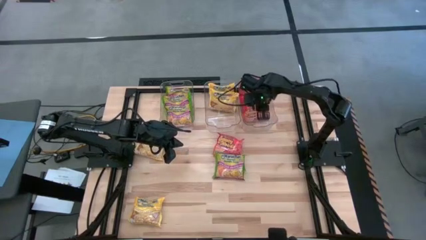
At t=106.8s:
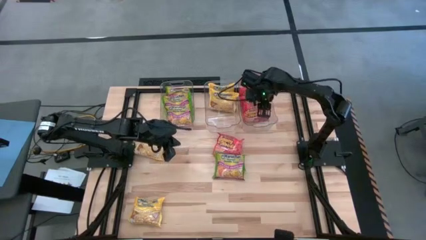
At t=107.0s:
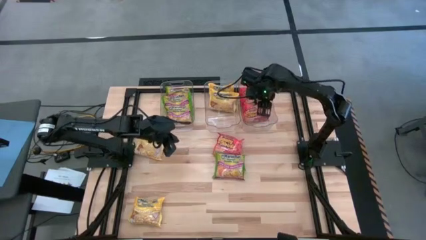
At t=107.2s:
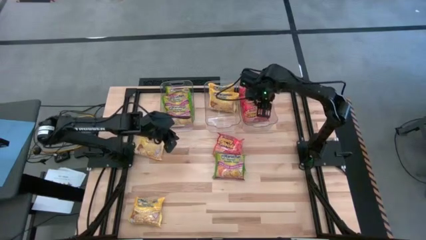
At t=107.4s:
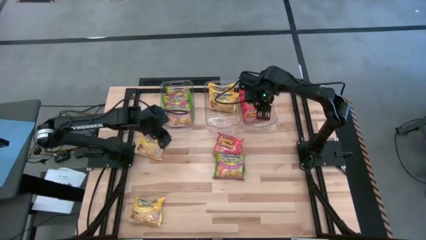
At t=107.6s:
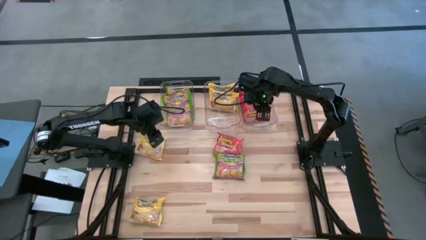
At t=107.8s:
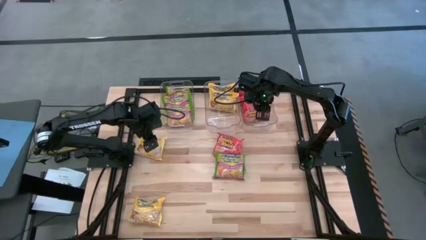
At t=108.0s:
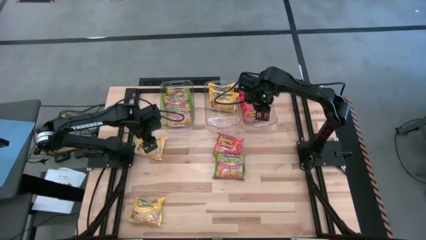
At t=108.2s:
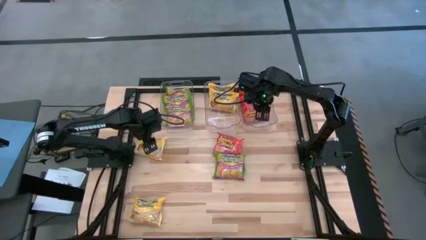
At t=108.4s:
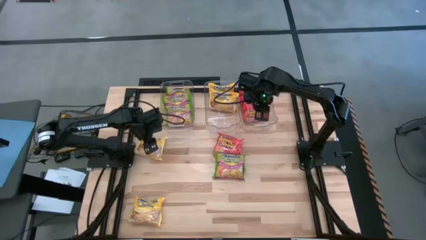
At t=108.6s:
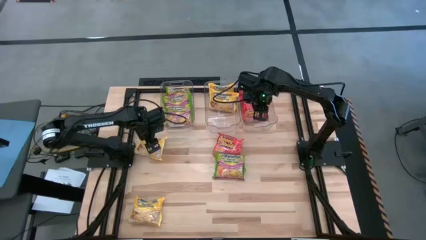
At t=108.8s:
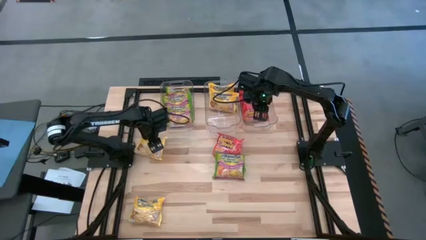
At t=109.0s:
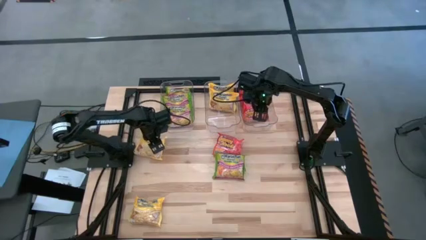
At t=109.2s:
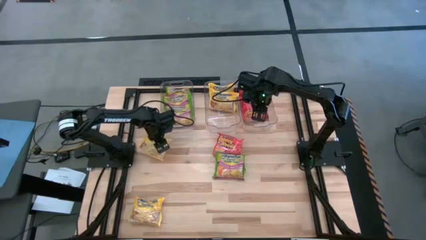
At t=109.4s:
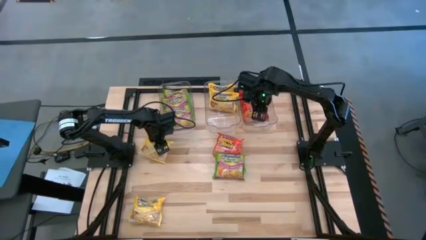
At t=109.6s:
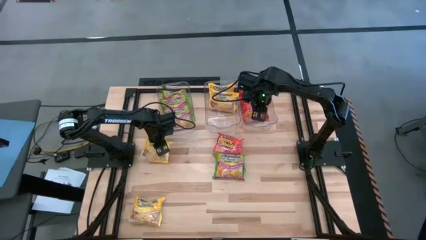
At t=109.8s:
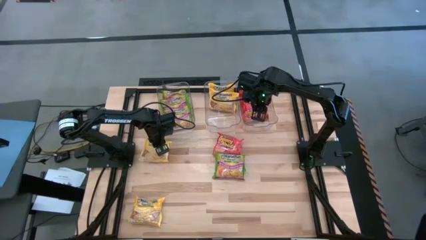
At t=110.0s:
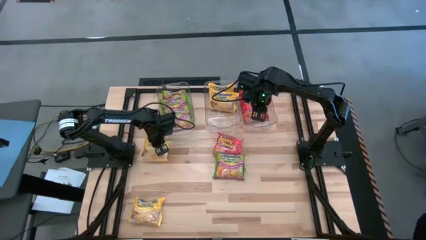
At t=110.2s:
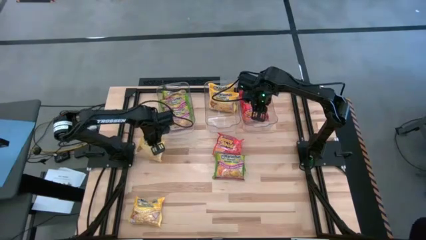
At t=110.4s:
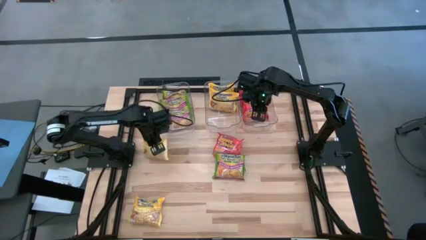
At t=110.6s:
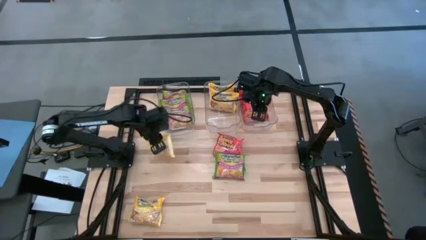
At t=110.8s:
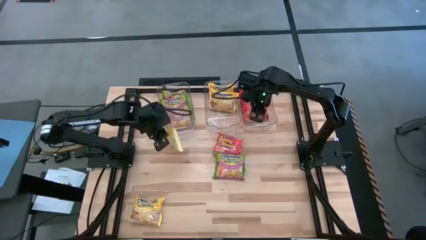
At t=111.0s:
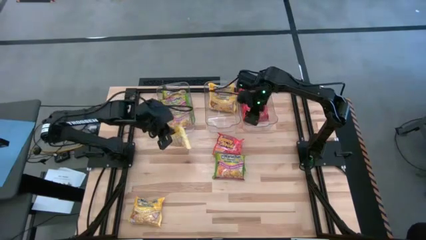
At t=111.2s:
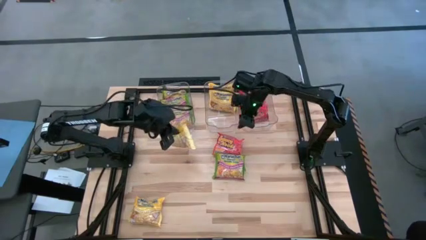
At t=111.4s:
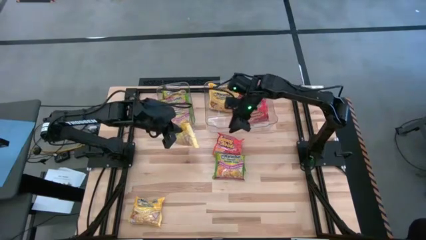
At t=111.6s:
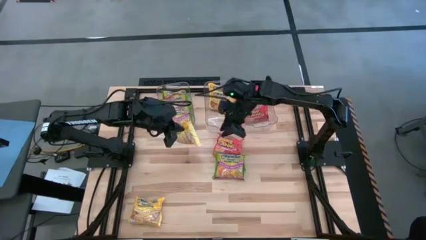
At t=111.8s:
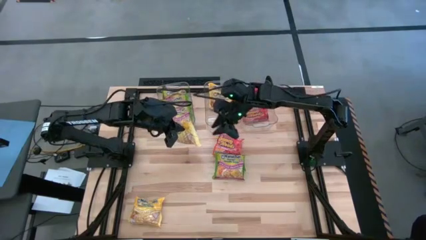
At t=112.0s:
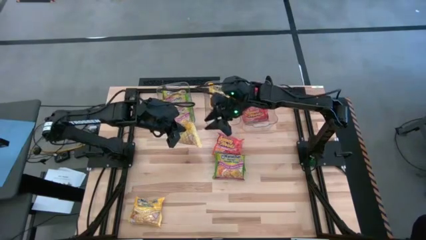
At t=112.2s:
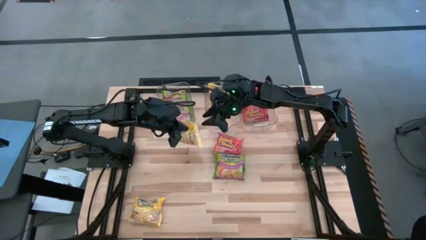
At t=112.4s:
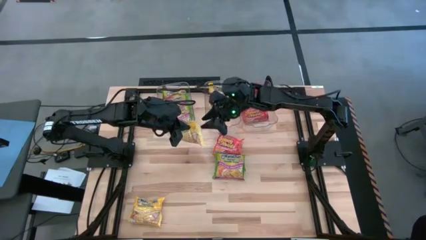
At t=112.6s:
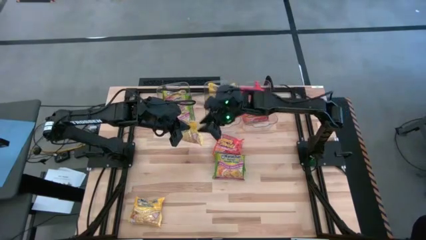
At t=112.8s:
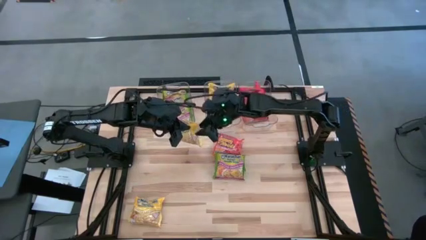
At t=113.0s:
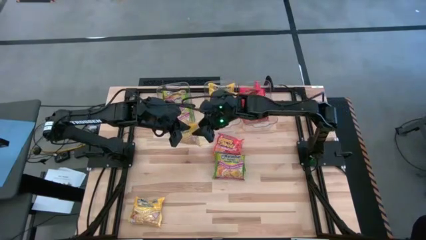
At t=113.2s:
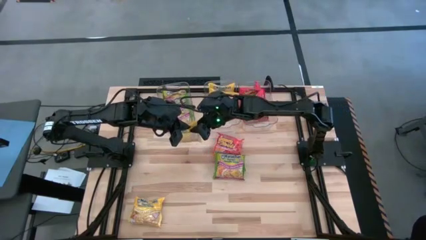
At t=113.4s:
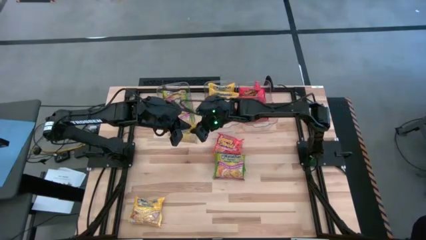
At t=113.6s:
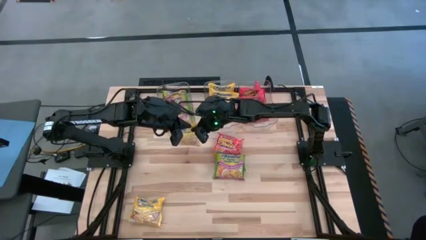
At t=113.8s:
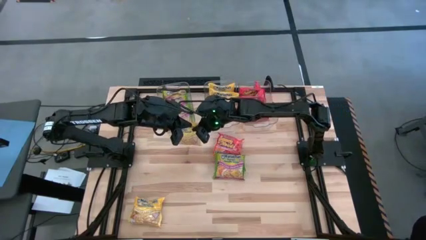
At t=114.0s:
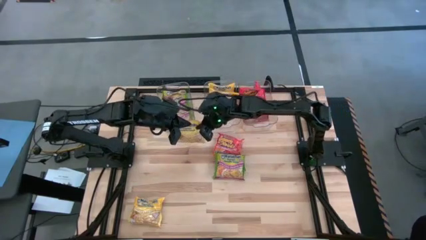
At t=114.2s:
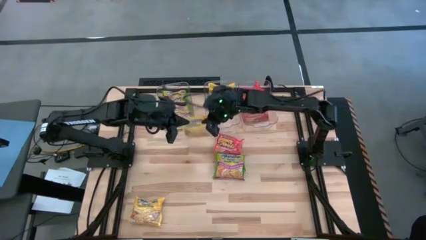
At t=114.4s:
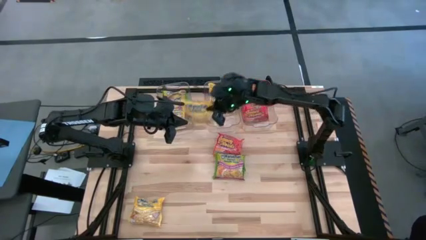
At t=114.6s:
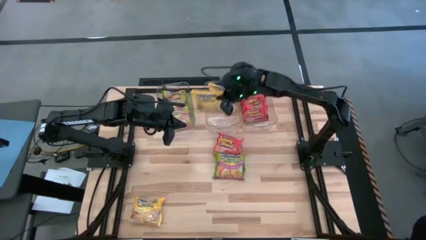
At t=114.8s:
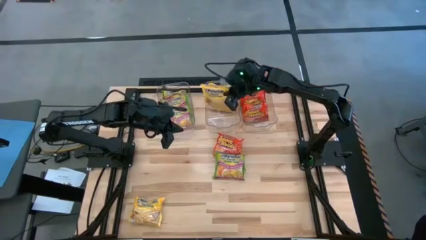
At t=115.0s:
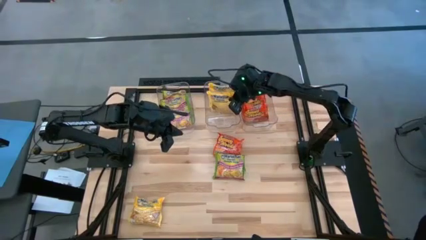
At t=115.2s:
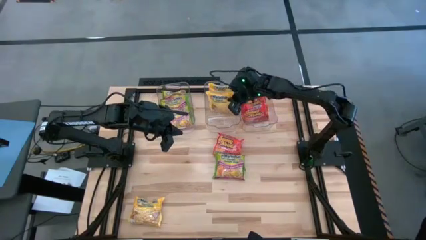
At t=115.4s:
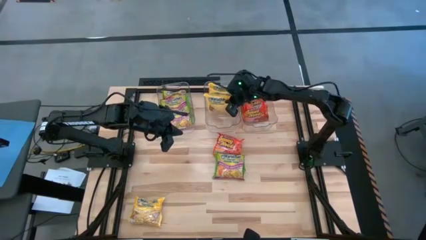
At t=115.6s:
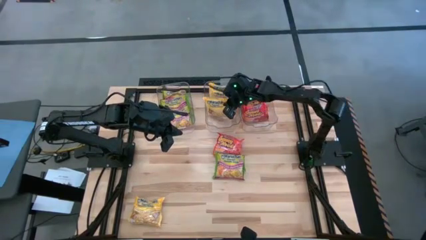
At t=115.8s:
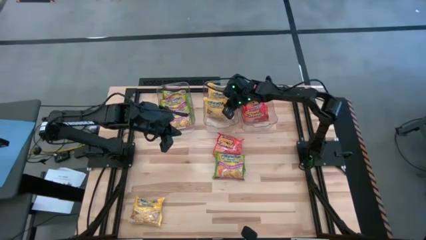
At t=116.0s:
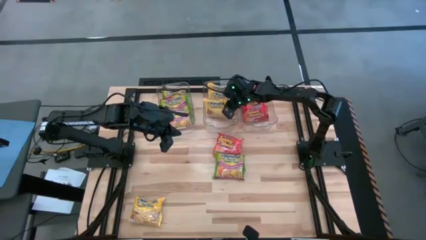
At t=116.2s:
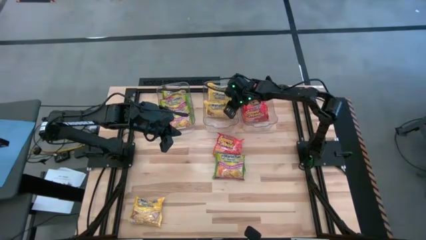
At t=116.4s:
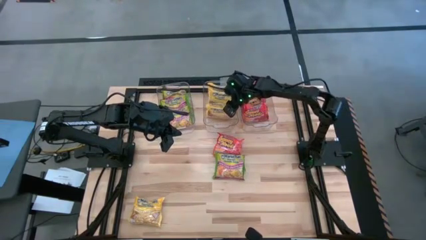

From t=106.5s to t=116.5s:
Task: Sort Maruchan noodles
Put the yellow noodle pack into the middle transparent bin

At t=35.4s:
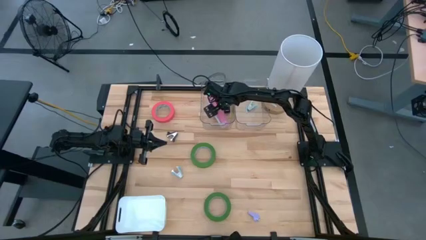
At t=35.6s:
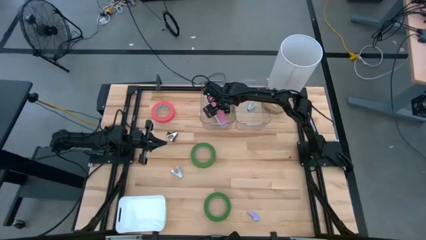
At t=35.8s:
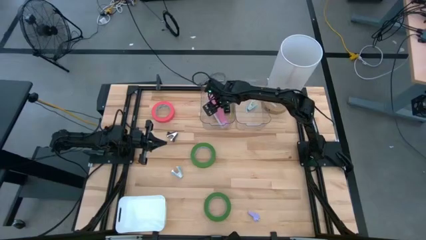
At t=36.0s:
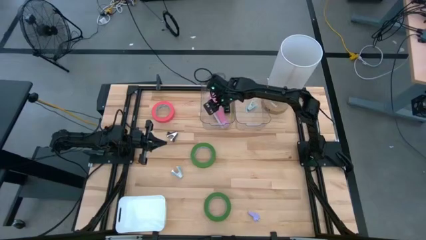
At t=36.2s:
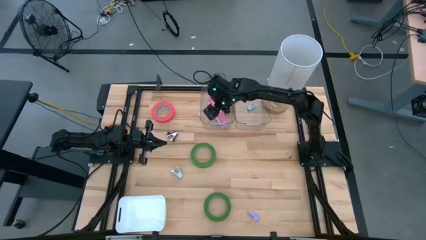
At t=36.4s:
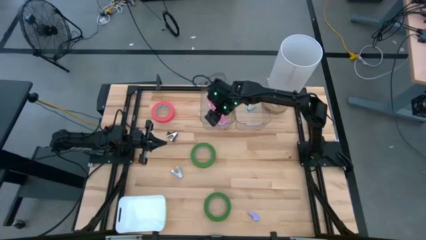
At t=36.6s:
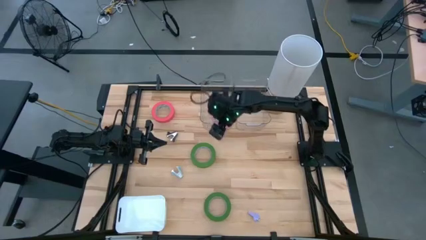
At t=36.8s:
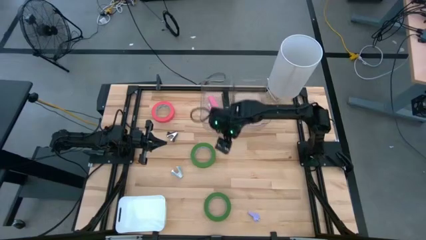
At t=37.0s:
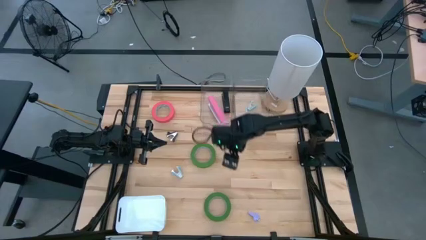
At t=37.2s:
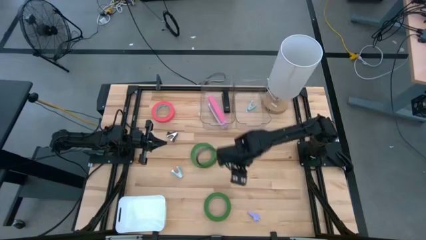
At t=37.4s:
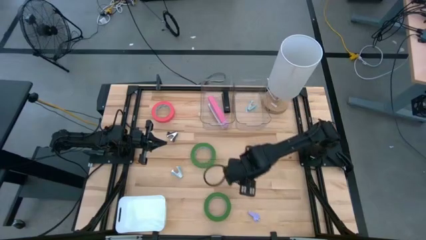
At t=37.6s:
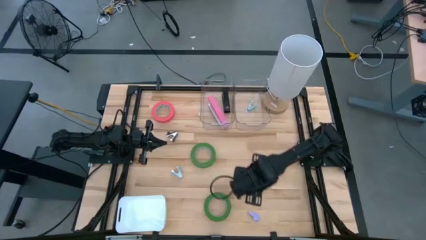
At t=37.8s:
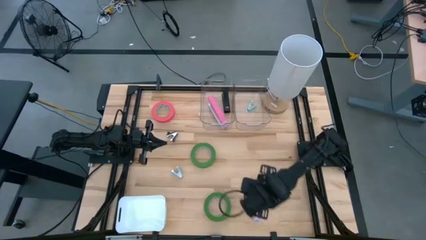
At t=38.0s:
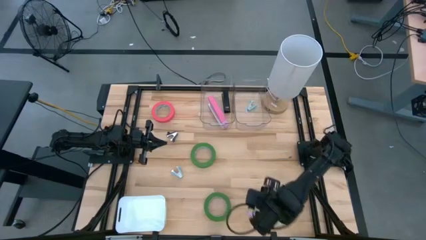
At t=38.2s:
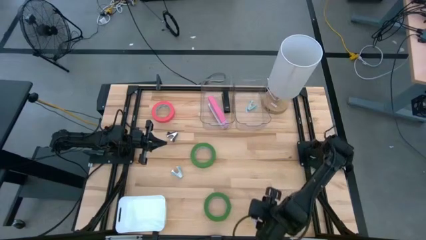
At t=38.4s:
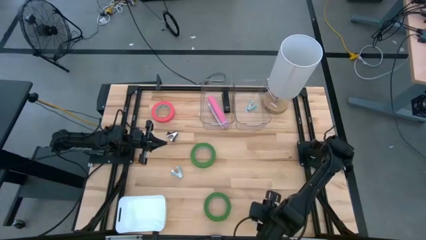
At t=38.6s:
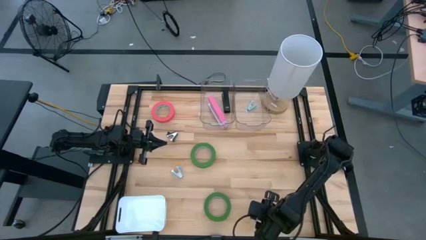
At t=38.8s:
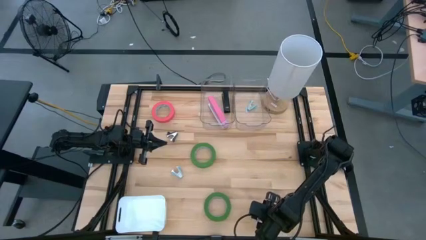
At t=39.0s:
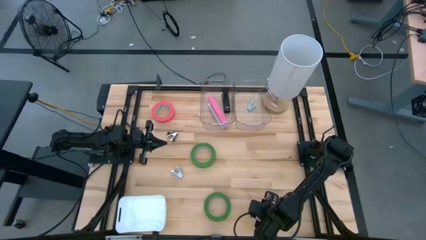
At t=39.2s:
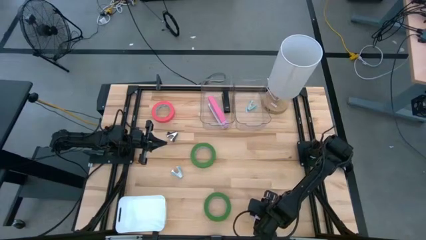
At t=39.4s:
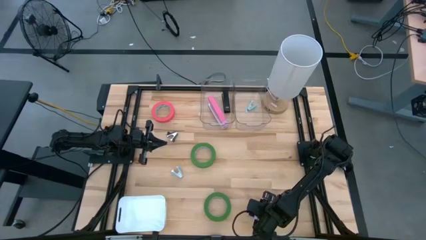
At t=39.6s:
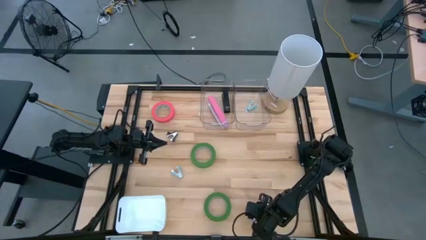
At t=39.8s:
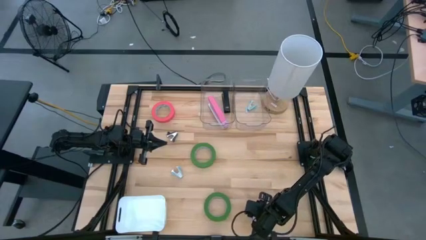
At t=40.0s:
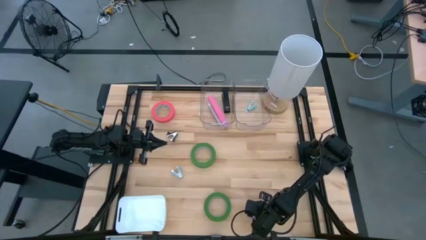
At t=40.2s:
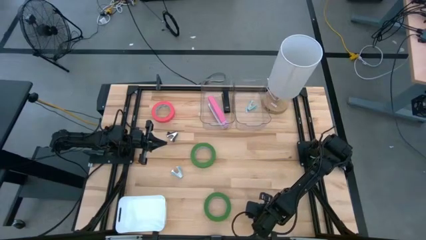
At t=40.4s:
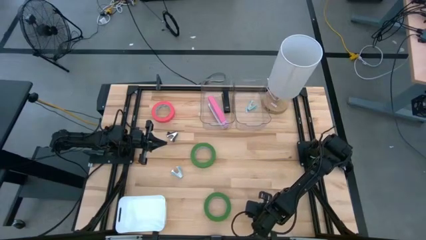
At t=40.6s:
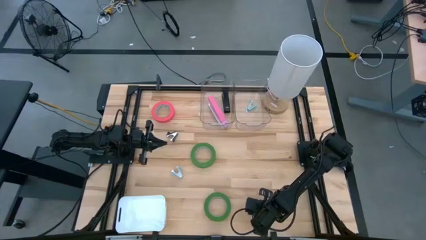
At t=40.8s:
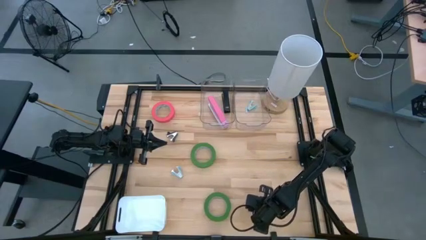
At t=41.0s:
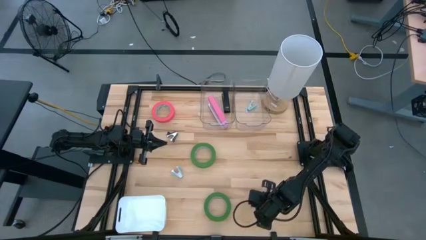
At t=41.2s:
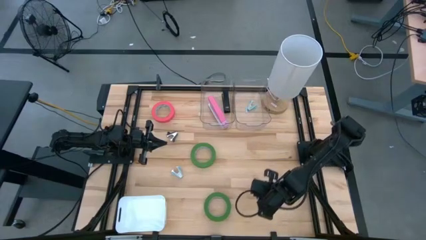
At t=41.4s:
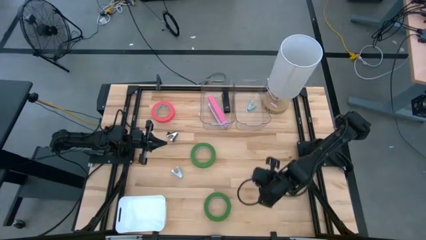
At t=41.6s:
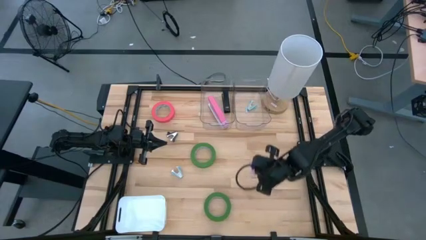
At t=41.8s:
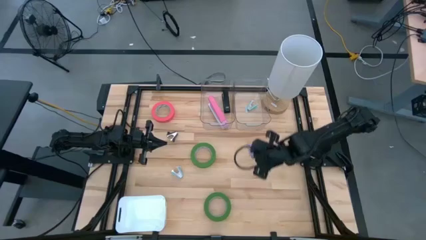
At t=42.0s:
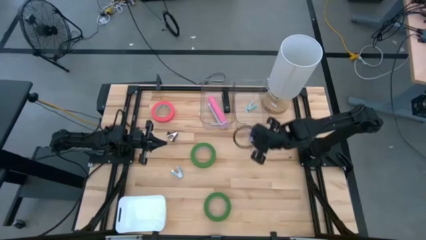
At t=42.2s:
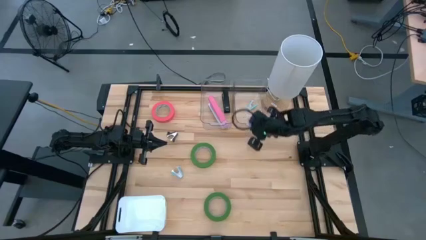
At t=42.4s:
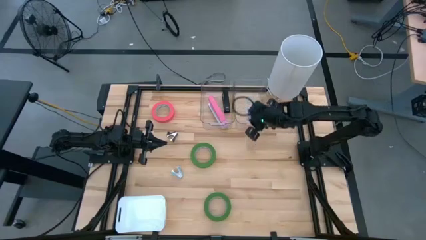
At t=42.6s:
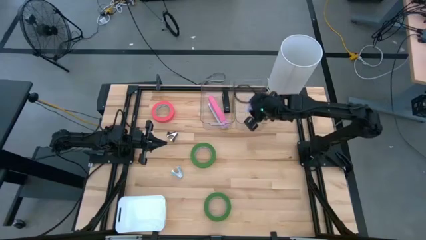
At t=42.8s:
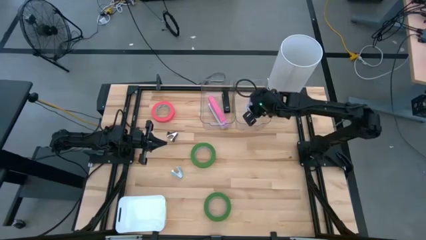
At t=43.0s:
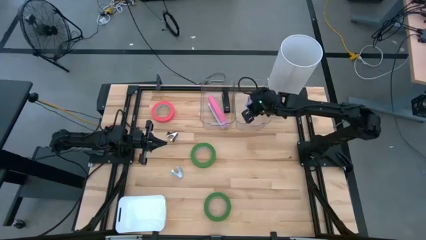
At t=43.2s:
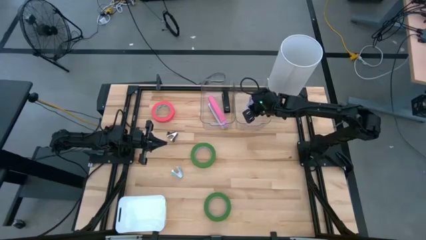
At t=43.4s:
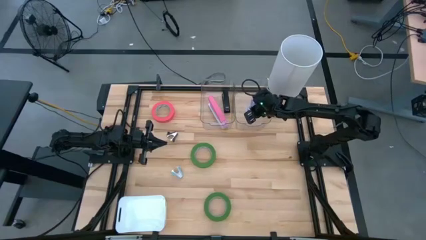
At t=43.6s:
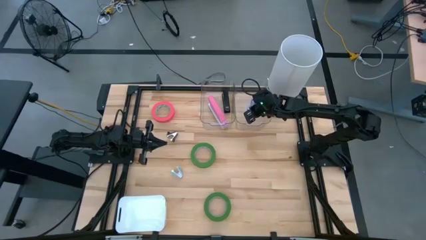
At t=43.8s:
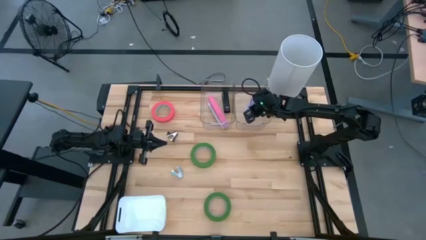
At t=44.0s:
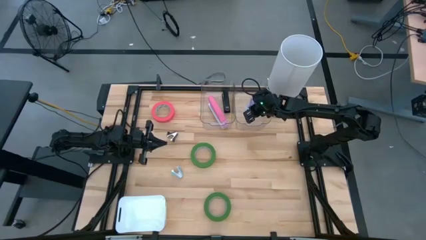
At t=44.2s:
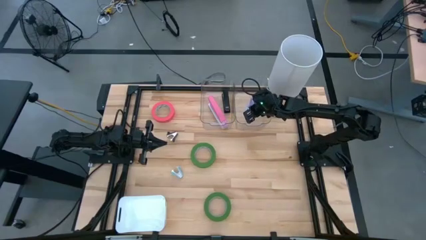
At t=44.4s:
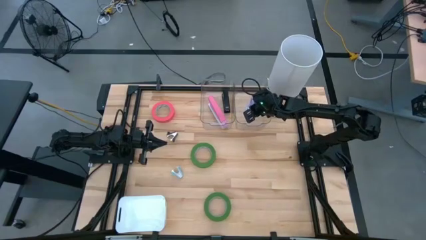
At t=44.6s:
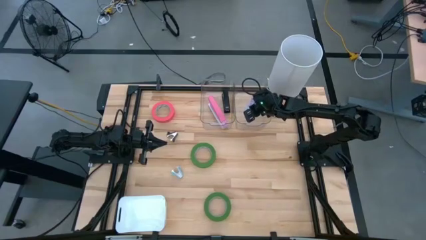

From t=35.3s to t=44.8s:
Task: Pick and place Stapler, Stapler remover, tape
Put the purple staple remover into the right transparent bin
